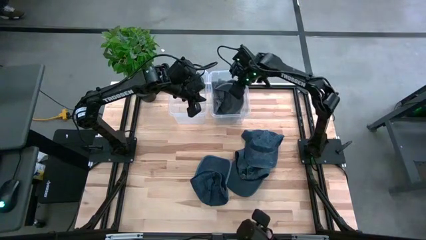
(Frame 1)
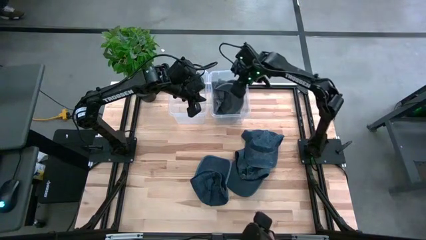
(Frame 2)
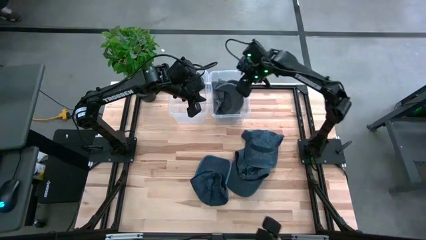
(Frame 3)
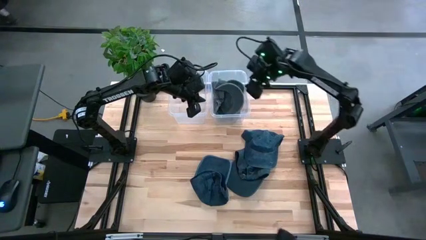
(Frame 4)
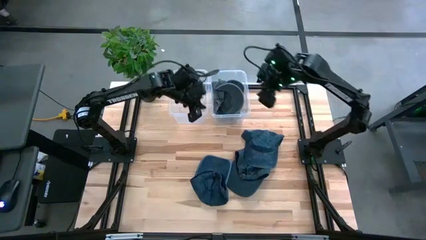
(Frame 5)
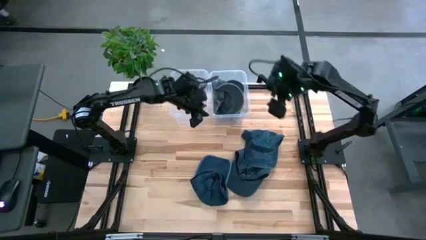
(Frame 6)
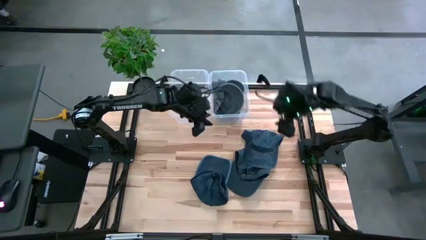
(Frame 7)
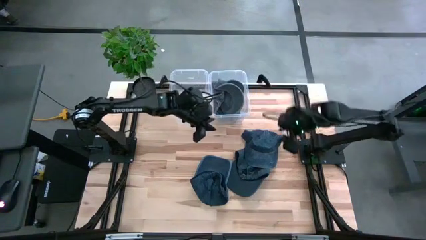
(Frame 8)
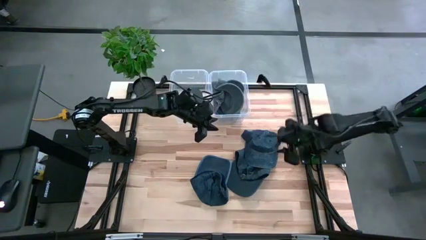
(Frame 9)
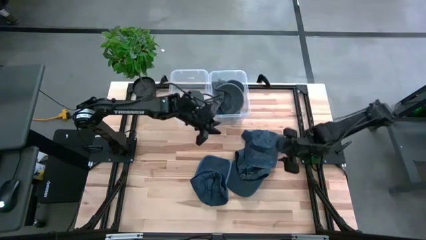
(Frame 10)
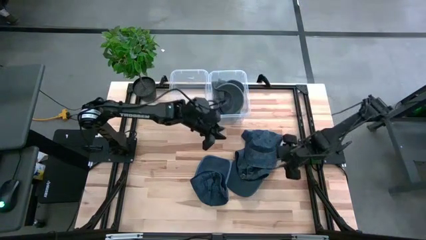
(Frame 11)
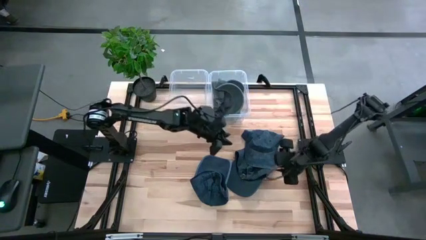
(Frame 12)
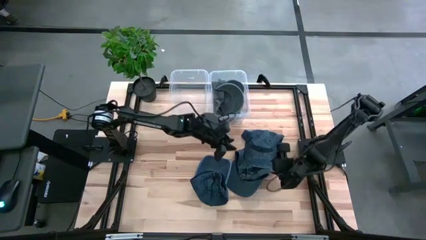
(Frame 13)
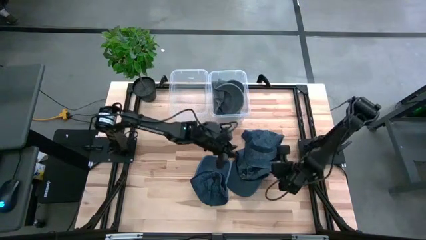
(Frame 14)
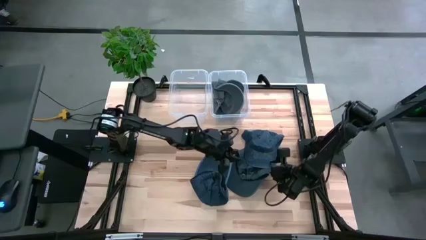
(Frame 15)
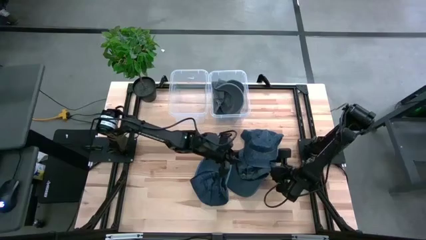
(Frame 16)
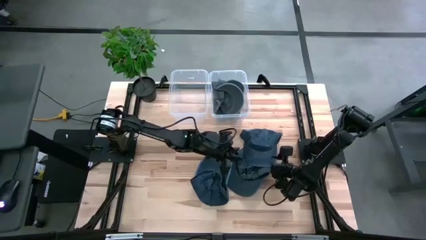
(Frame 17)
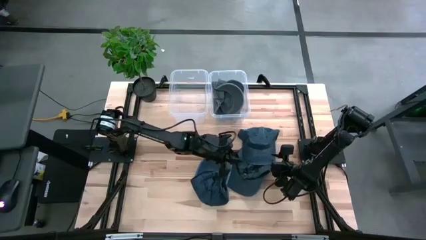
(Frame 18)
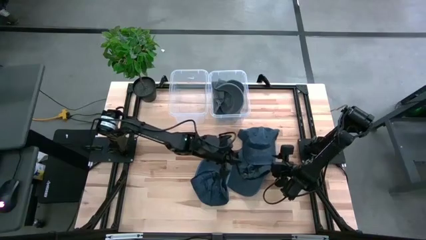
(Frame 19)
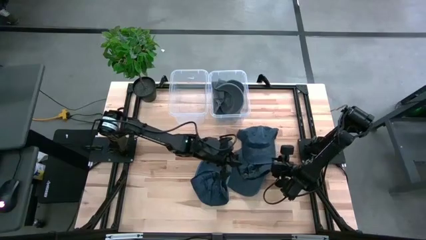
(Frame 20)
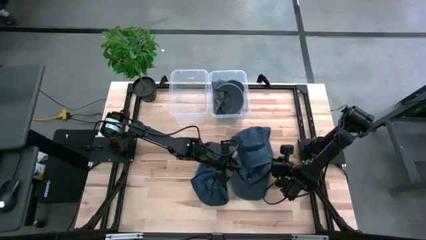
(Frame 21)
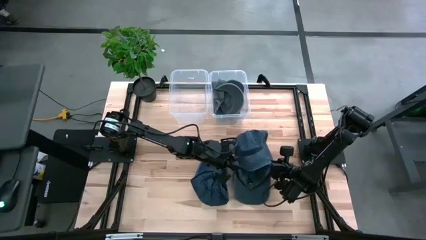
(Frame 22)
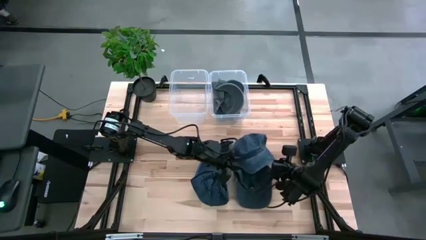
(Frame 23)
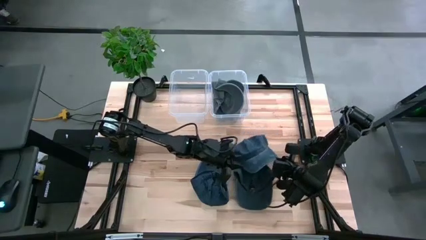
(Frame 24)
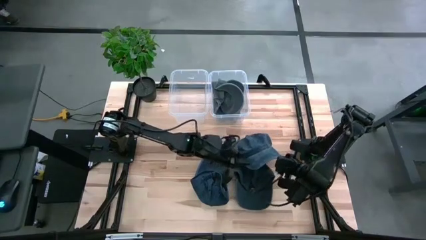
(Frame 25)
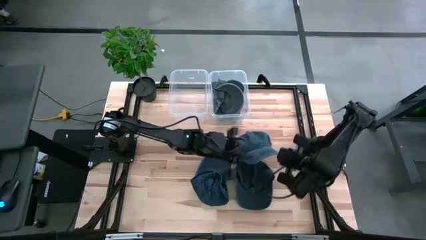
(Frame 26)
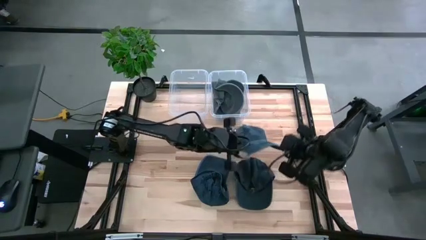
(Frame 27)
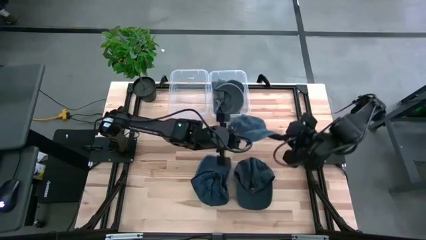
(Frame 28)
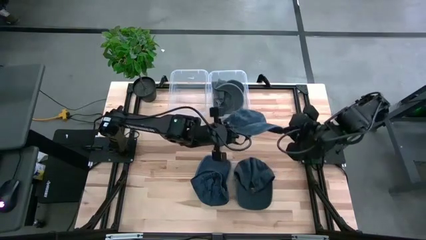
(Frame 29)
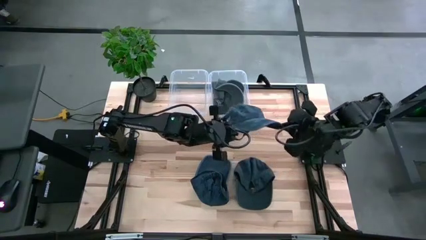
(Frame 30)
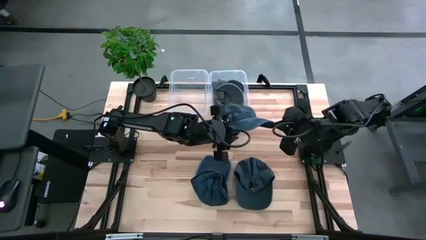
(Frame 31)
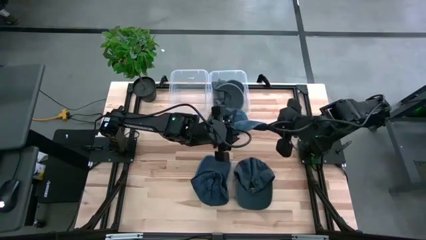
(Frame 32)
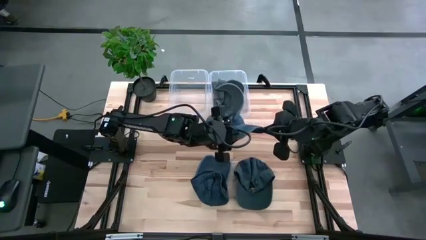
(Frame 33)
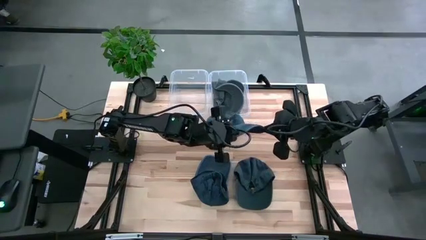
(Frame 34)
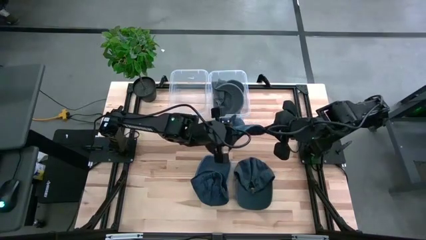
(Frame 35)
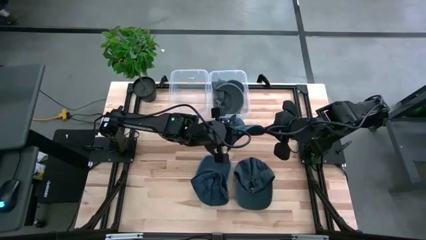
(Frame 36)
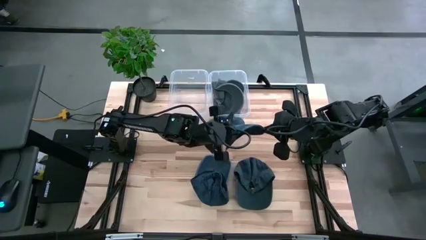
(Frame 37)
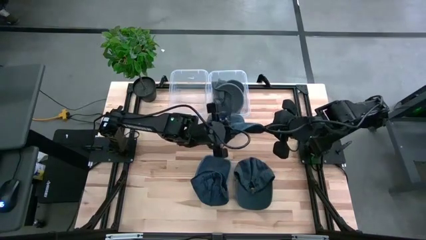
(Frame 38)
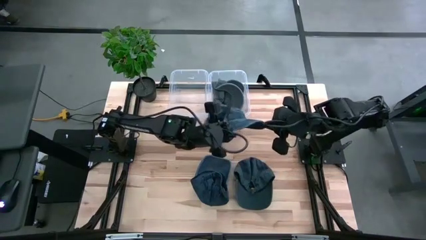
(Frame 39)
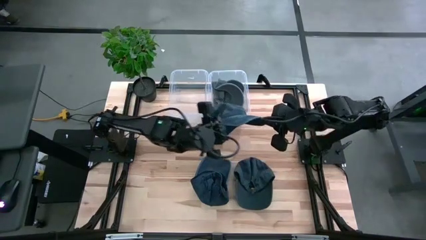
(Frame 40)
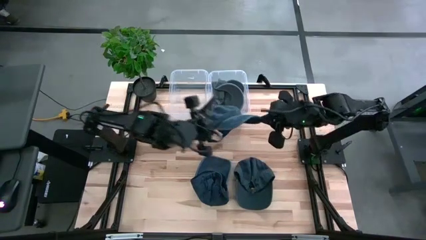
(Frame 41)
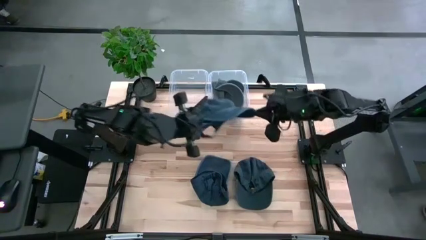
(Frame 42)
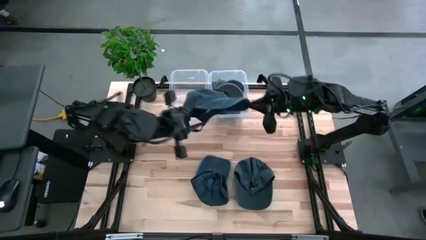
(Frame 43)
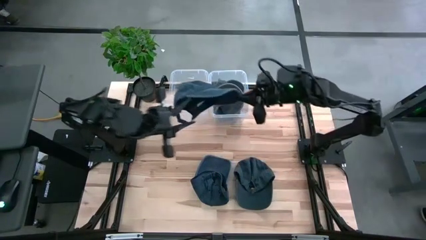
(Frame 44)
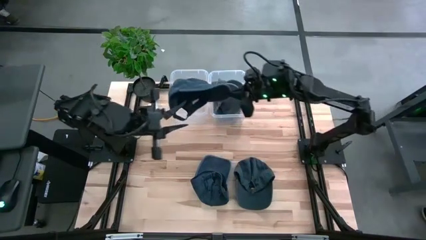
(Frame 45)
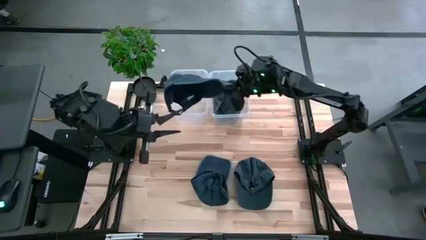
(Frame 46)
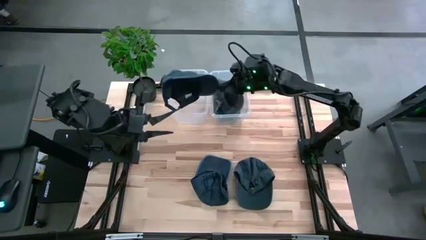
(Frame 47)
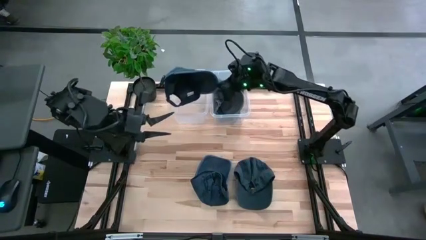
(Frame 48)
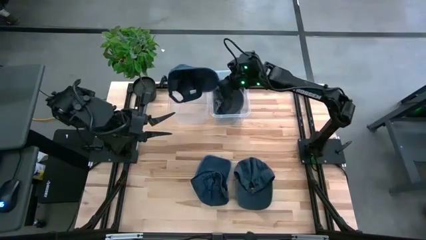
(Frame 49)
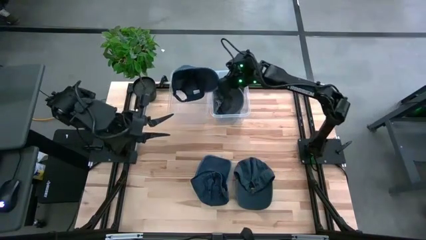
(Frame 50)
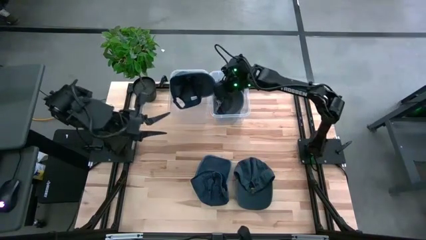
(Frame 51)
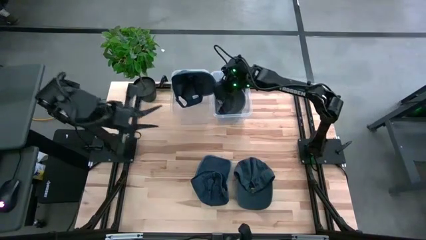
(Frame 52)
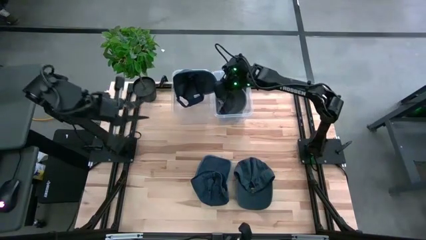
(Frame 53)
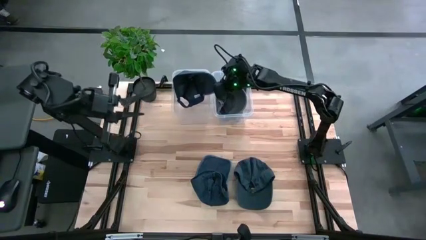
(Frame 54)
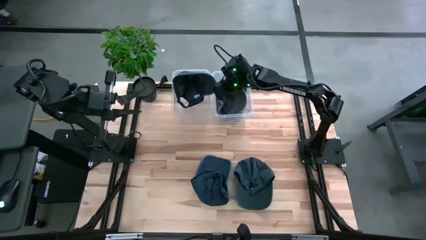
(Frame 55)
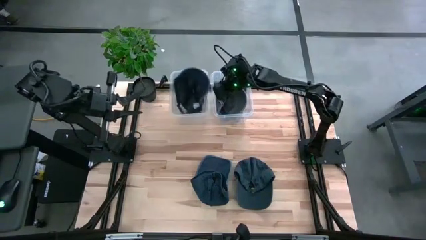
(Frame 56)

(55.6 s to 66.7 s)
Task: Pick & Place hat
Put the top blue cap into the left transparent bin

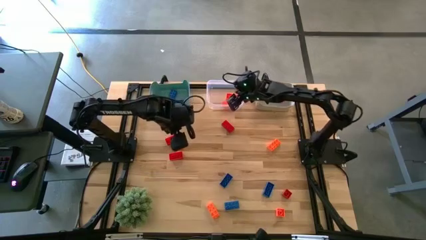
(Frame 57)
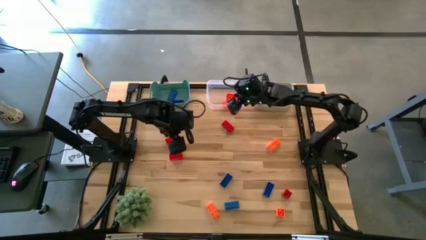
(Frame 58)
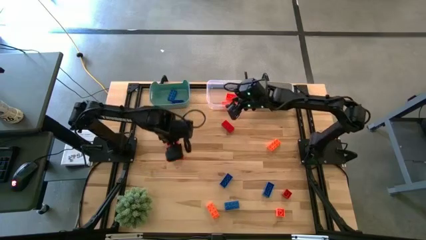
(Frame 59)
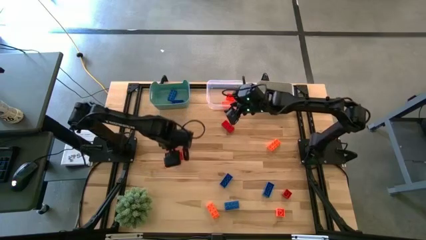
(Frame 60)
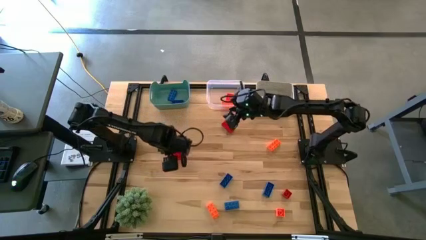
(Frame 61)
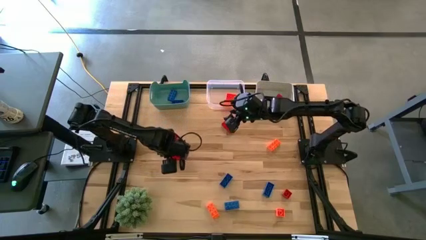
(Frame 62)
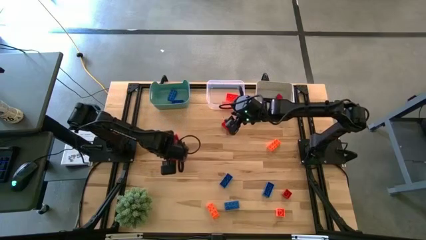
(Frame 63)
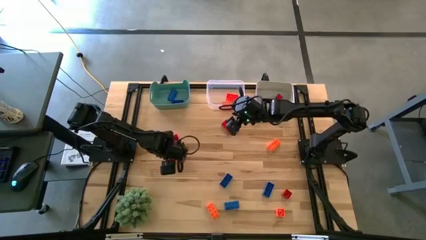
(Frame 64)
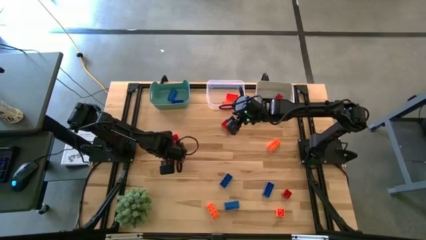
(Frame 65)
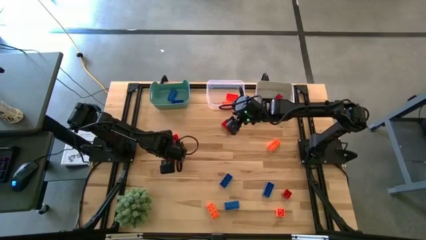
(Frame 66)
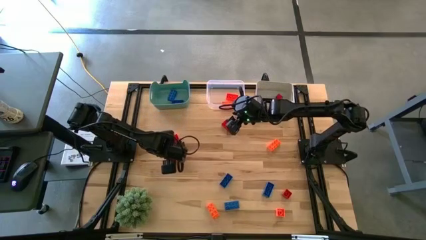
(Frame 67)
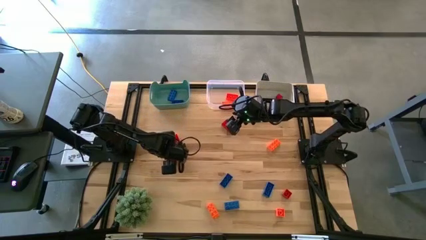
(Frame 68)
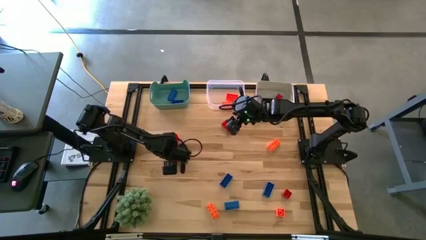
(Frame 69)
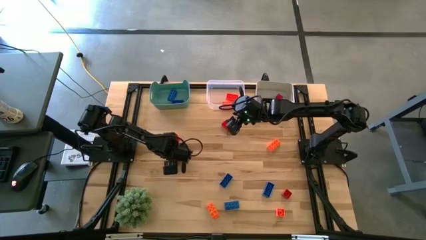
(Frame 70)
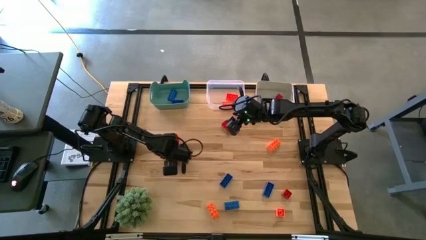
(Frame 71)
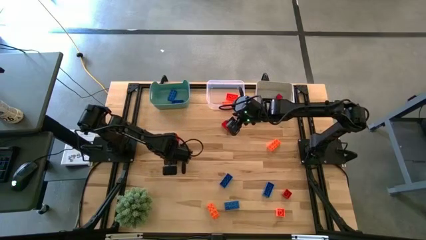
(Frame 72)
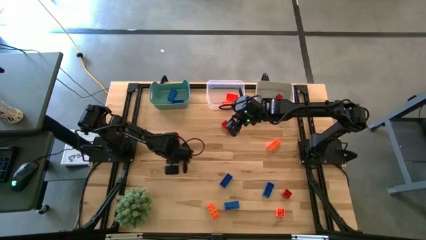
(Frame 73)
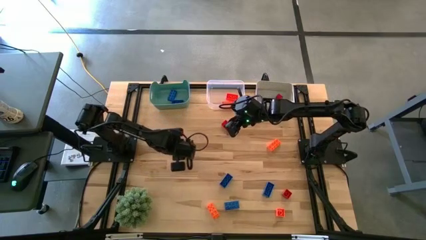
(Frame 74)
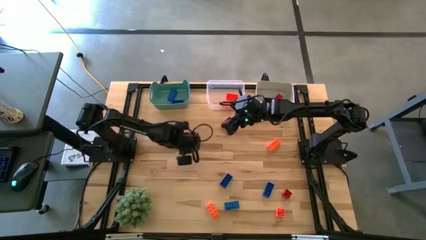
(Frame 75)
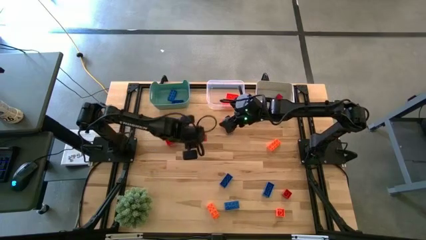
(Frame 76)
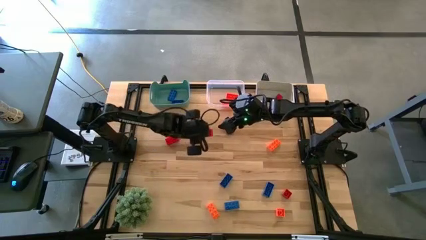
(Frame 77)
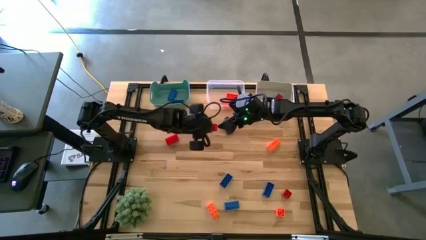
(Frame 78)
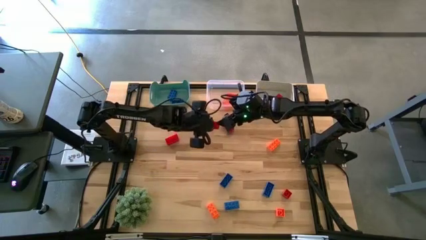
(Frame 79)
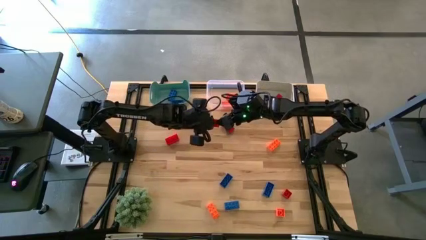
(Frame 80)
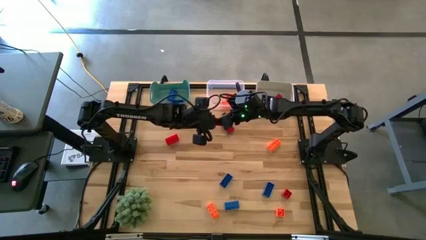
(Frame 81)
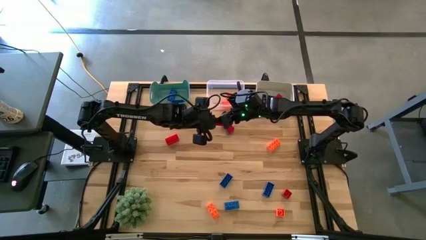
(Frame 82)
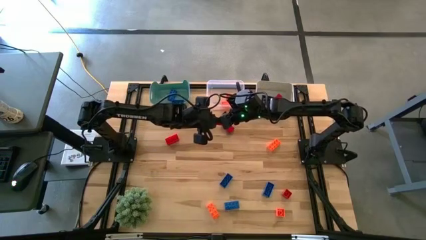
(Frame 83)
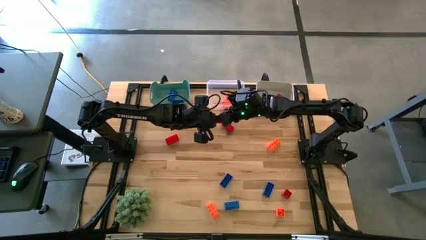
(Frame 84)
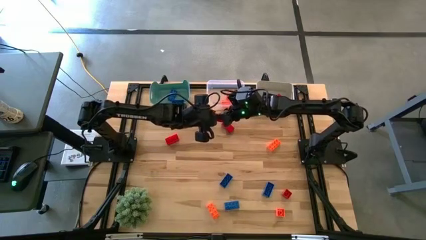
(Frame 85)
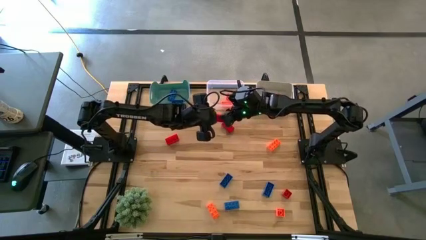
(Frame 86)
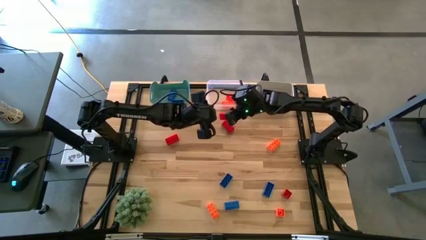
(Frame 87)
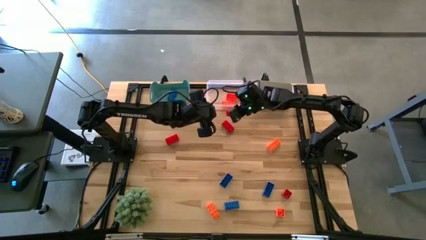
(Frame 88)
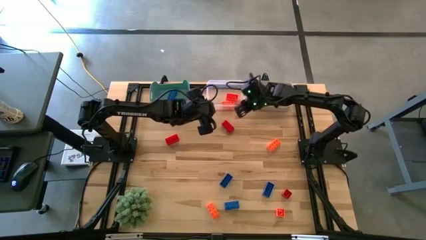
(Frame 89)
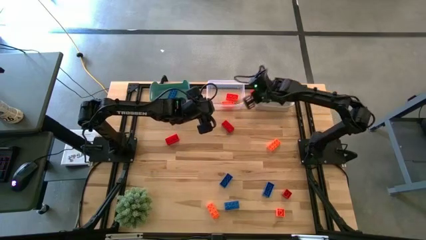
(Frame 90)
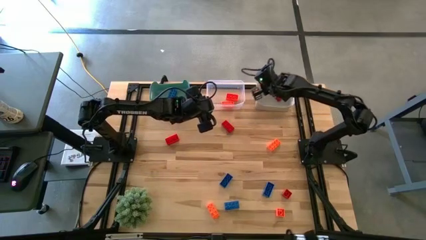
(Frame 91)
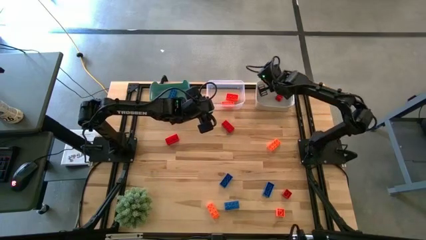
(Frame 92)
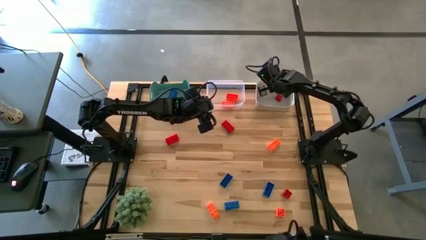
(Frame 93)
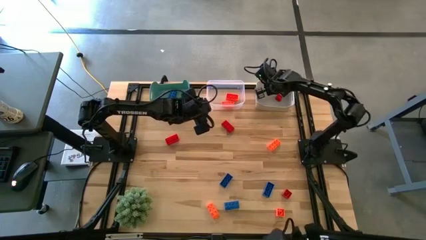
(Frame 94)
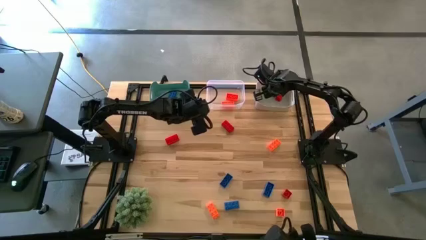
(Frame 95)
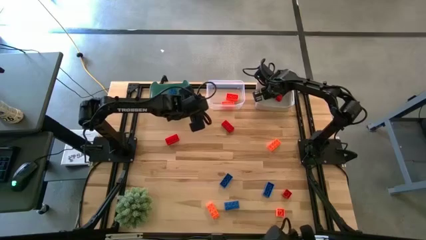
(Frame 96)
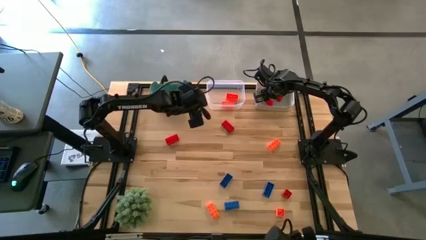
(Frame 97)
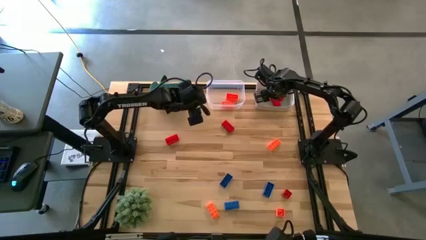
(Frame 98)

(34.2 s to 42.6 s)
Task: Sort & place blocks by color
Put the red game piece into the gray bin
